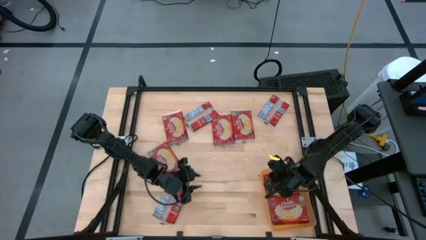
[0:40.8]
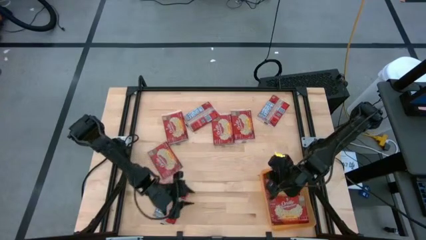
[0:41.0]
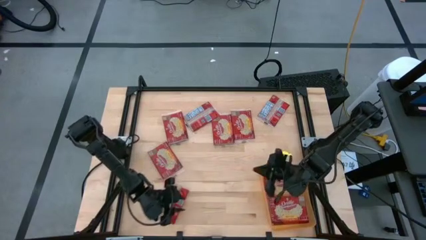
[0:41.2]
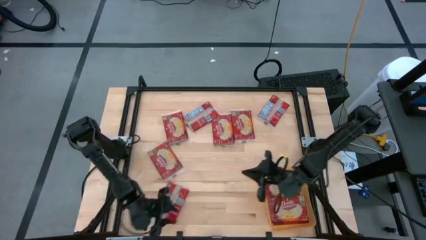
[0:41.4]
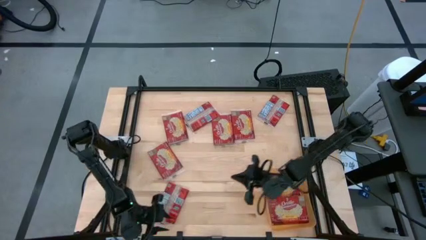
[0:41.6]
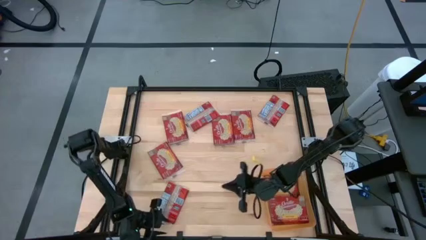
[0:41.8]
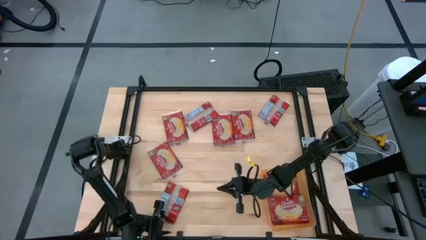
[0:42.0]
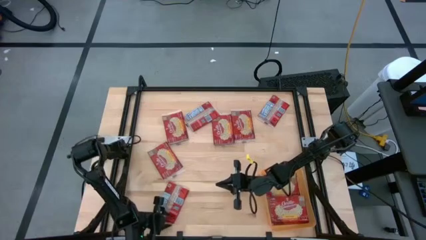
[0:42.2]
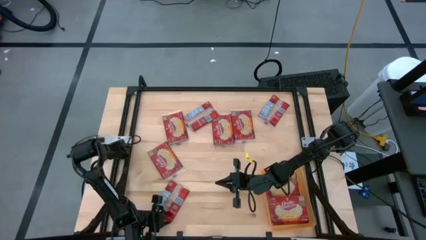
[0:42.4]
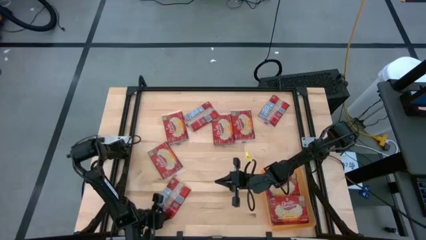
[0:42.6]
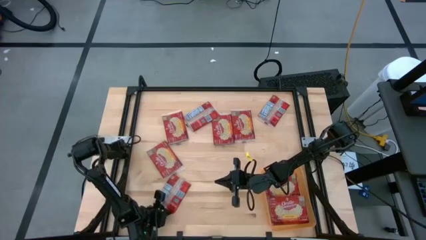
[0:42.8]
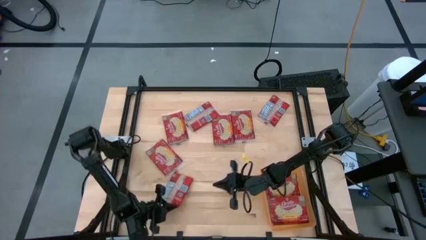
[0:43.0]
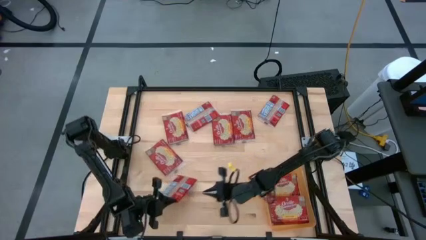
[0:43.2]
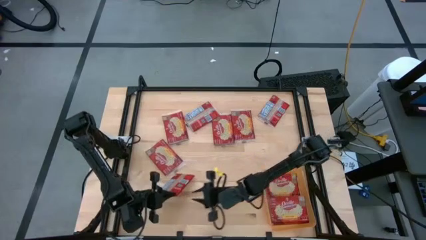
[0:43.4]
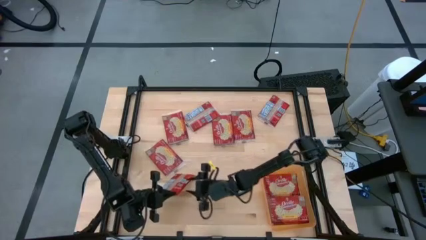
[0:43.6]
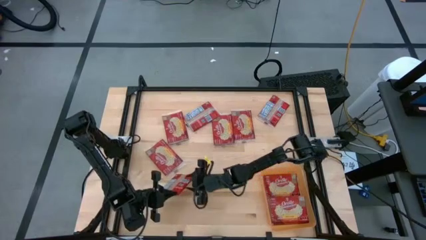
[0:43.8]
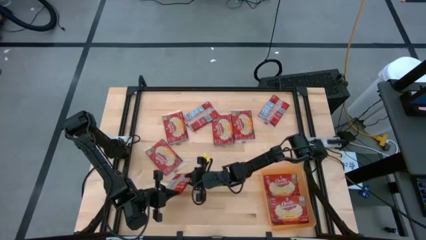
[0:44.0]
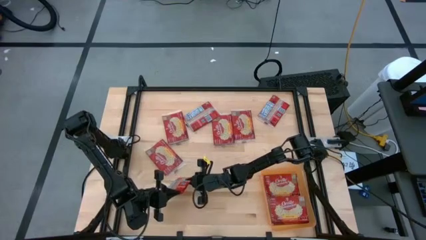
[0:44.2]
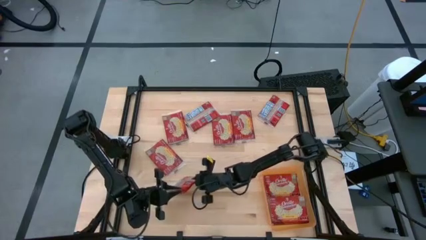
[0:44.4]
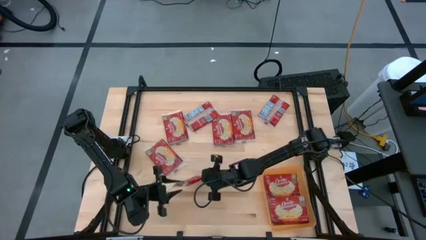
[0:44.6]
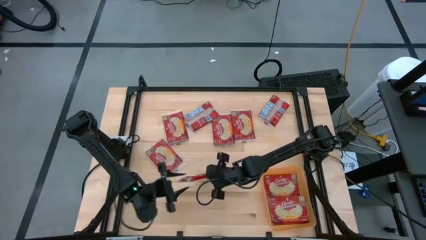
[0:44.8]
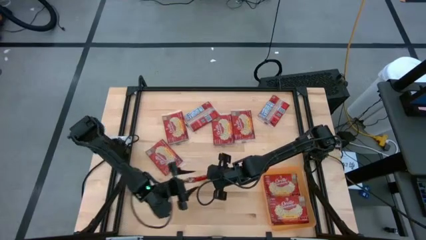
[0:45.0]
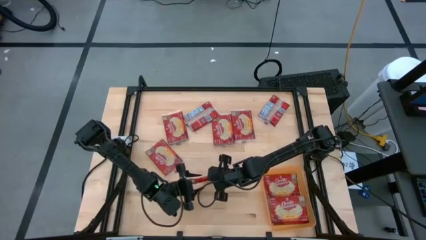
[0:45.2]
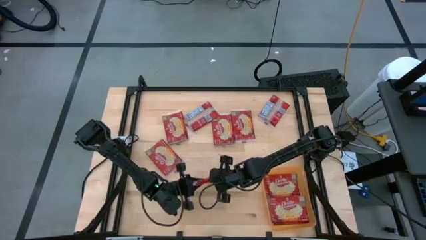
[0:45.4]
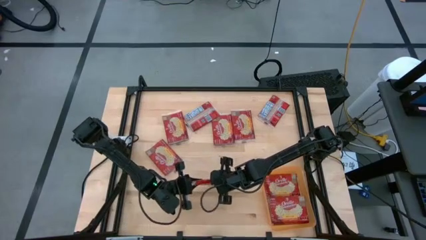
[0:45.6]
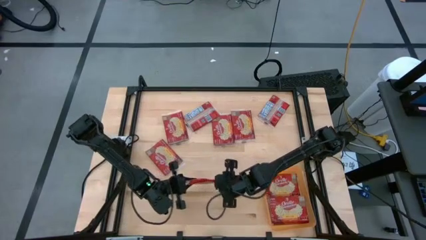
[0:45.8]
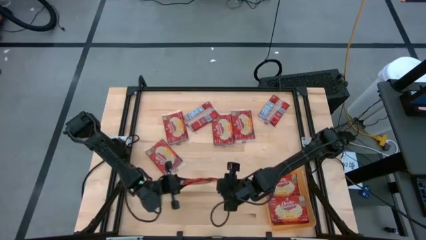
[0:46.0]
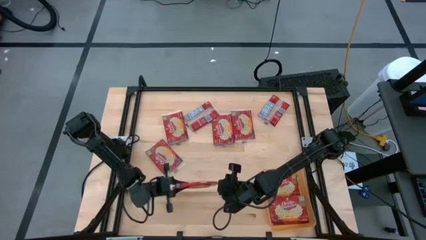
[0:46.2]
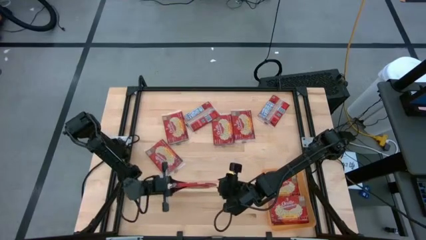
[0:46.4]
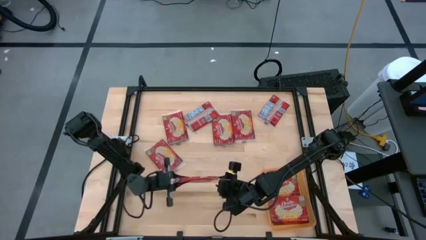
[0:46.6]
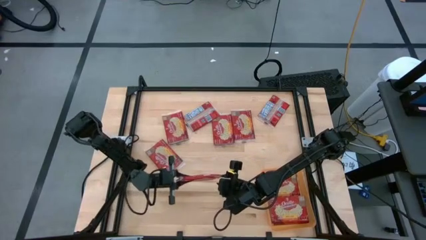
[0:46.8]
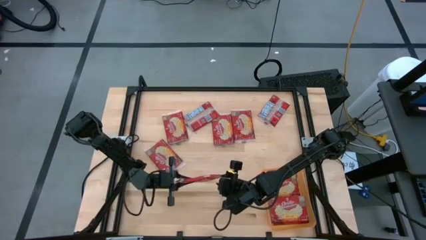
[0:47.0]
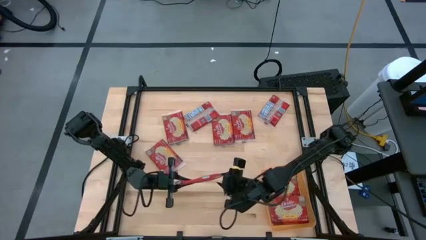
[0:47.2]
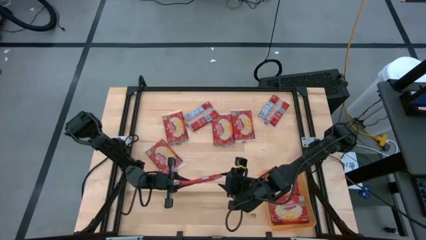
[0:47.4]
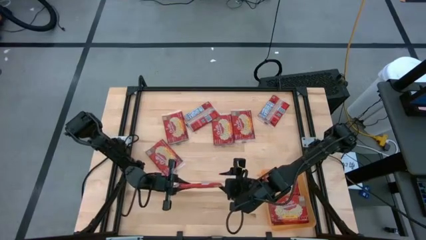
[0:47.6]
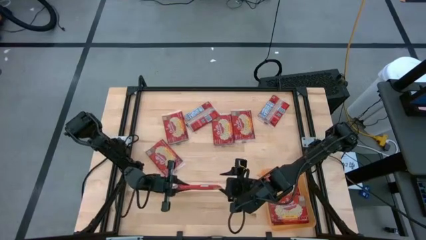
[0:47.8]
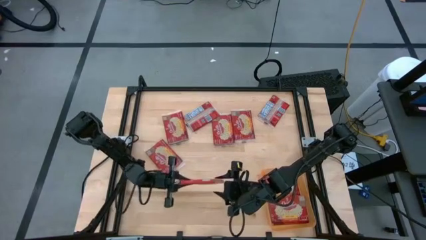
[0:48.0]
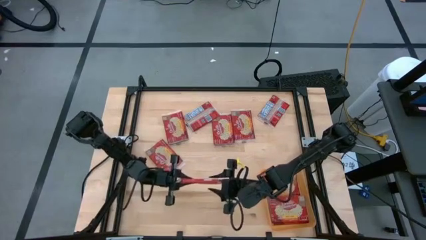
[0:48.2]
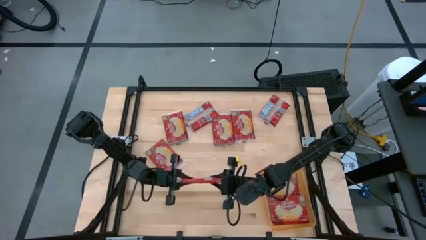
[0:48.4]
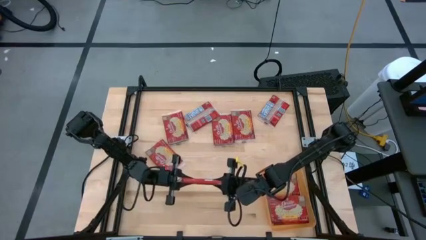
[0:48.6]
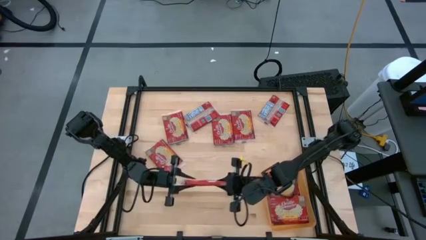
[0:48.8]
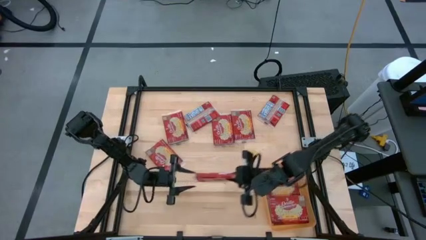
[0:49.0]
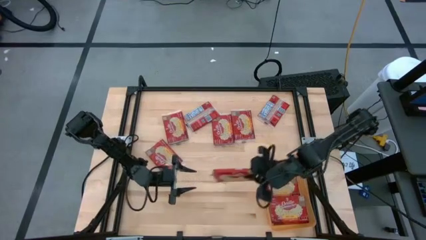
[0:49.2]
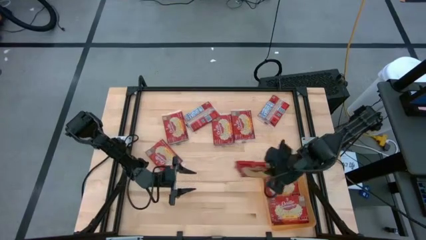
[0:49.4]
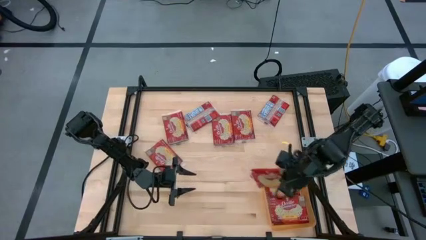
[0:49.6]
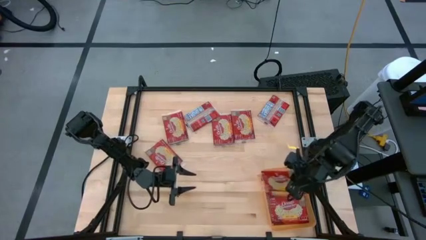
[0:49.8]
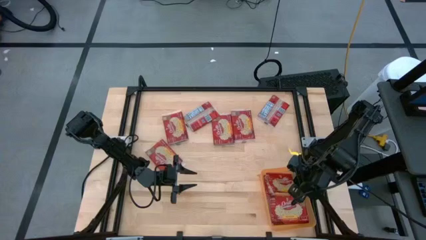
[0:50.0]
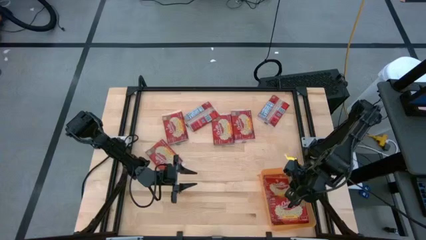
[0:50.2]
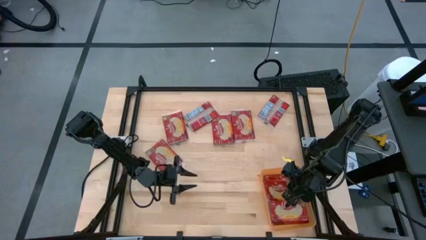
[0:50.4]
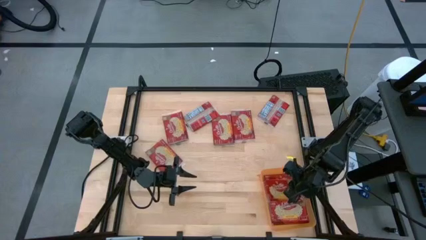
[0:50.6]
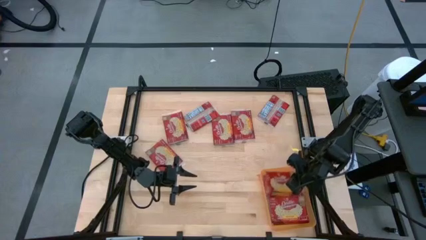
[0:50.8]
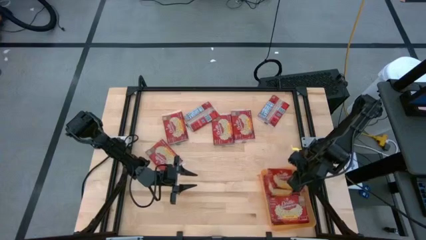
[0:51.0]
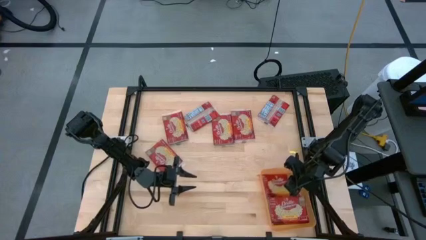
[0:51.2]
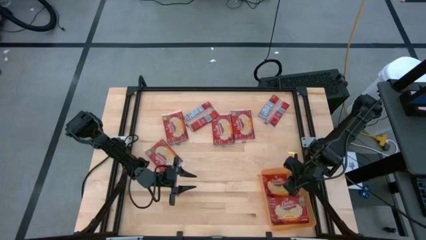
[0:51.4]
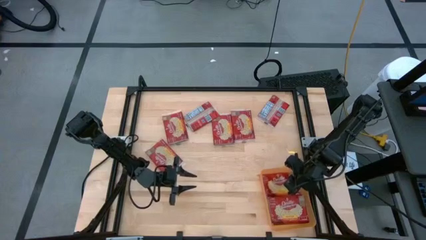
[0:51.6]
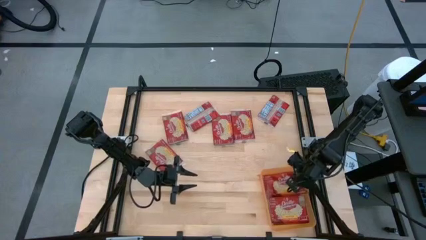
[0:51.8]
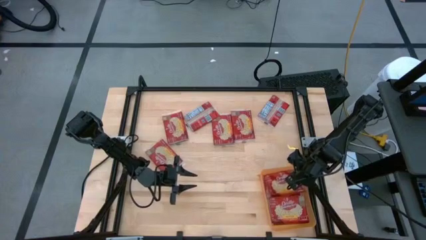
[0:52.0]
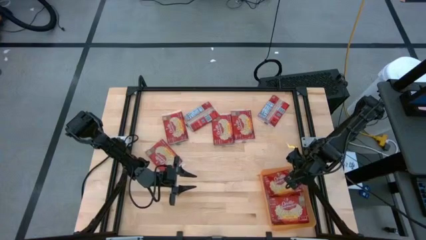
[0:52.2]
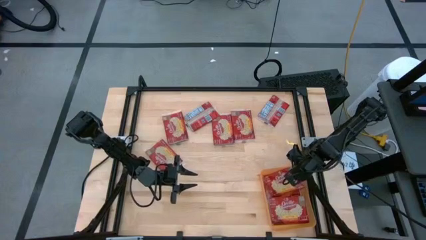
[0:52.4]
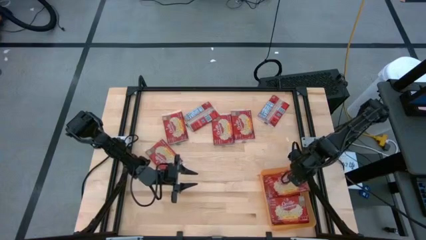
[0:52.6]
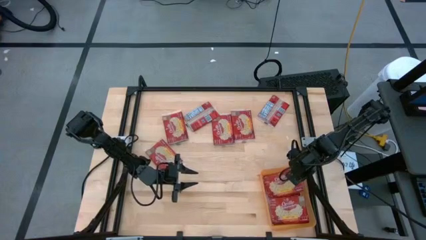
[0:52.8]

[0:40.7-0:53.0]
Task: Sort popcorn bags into baskets
Put the popcorn pack into the orange bin
